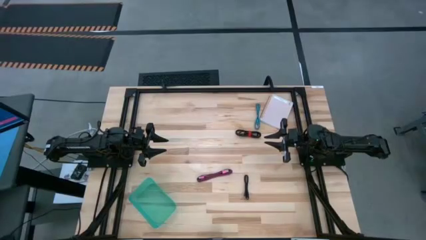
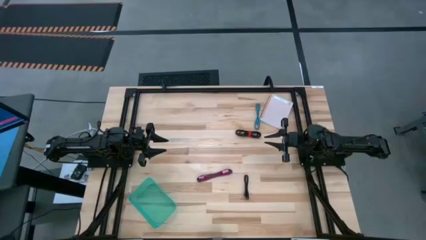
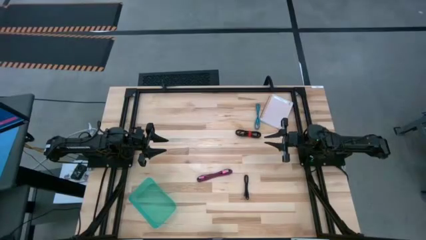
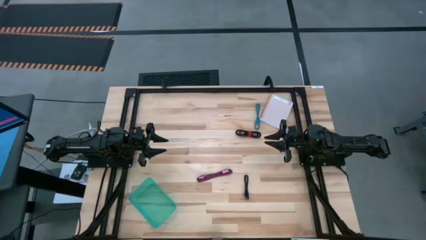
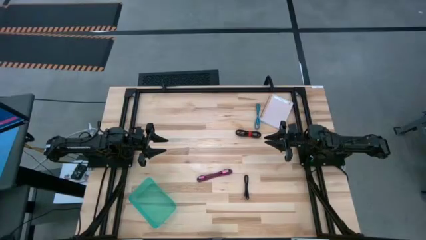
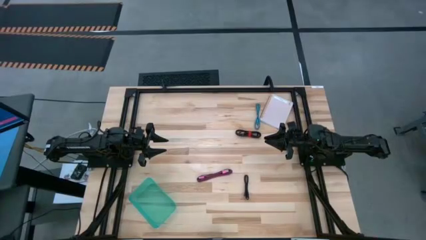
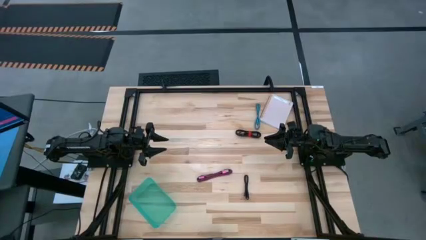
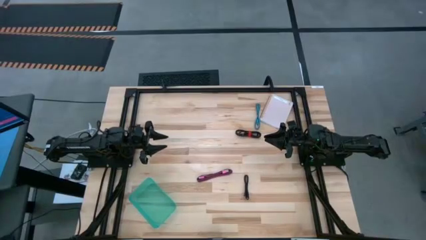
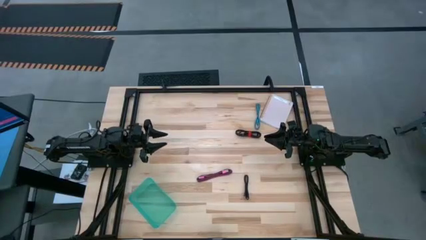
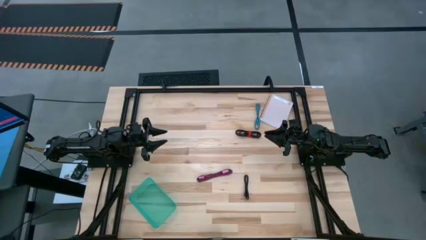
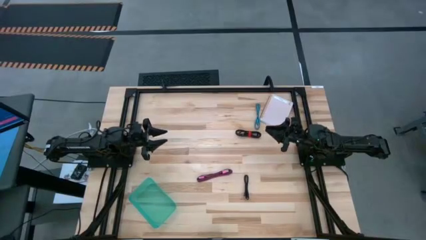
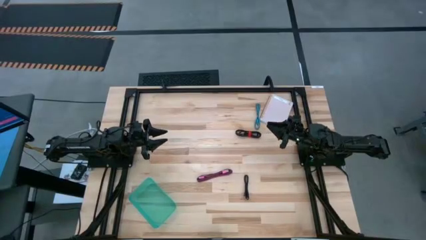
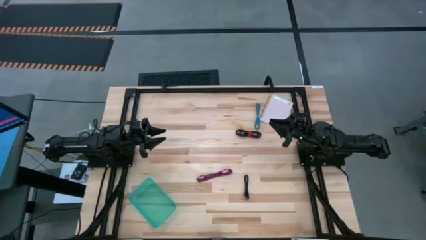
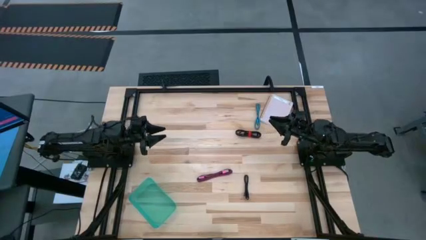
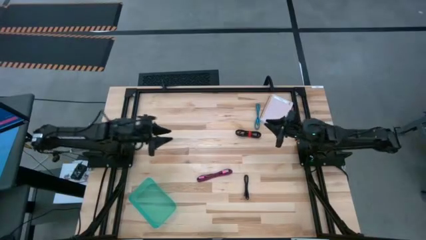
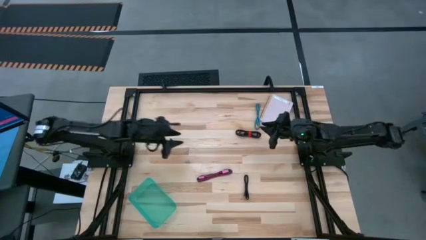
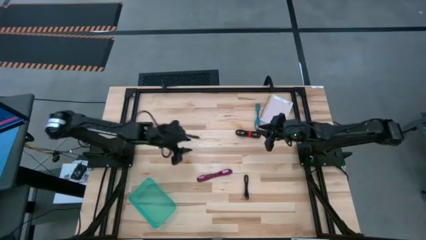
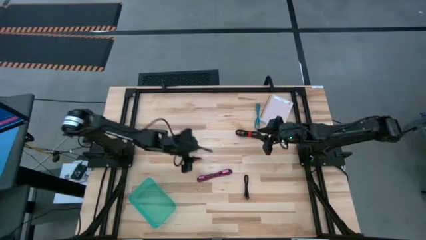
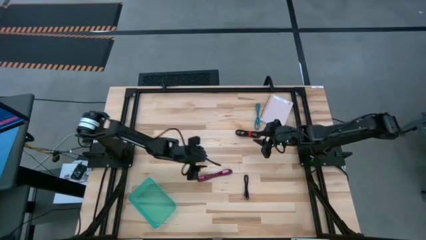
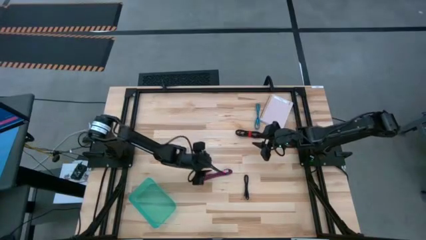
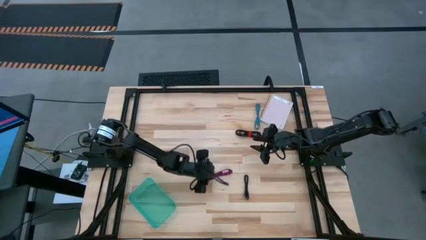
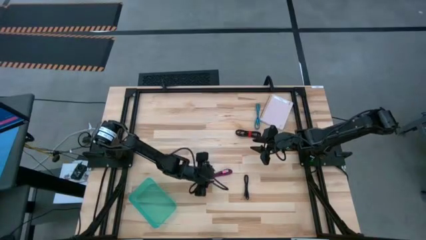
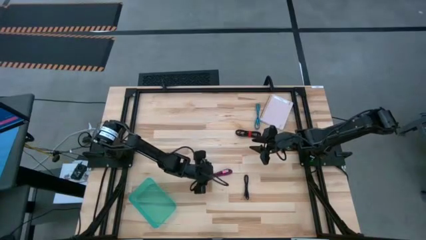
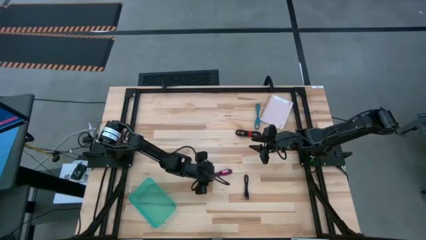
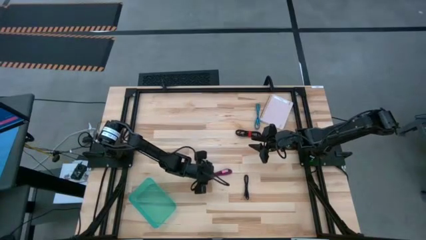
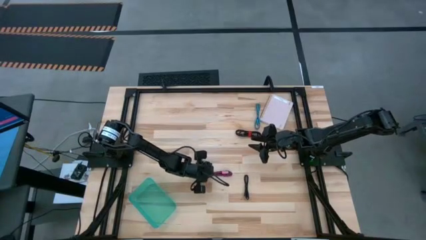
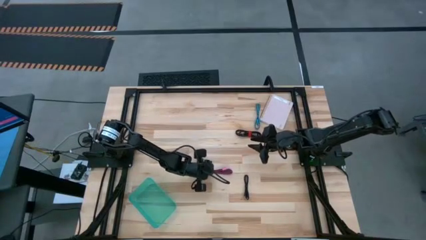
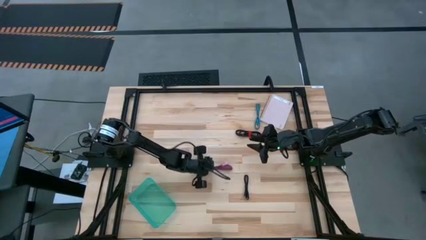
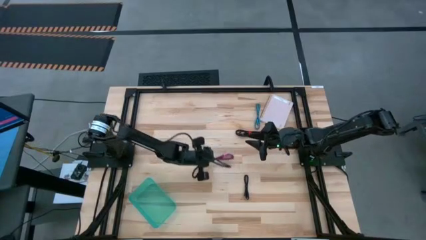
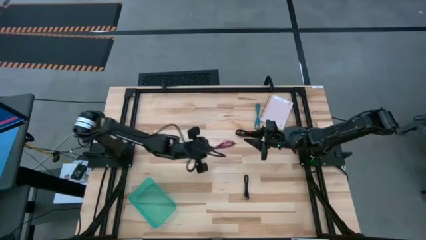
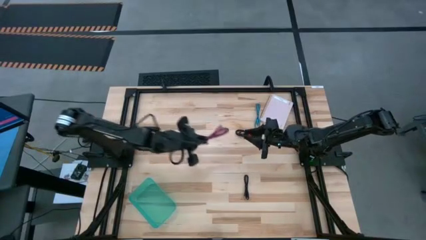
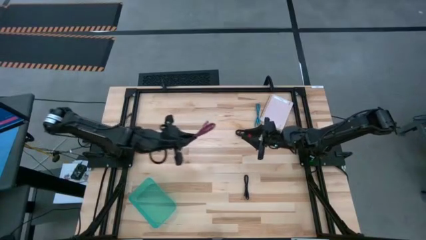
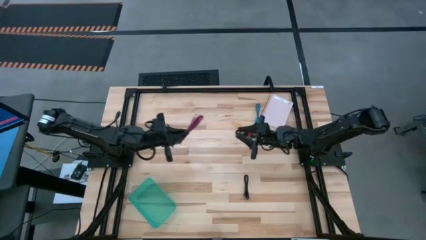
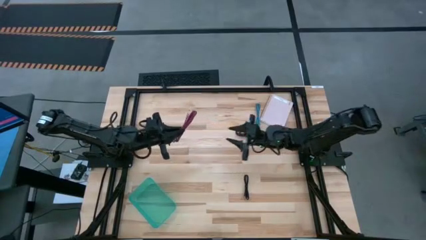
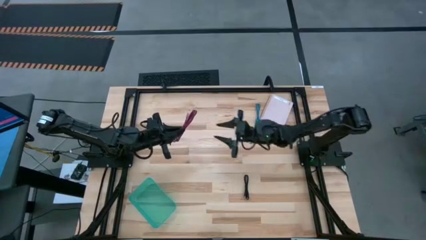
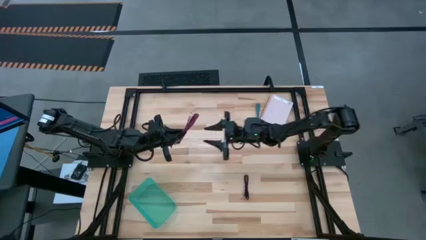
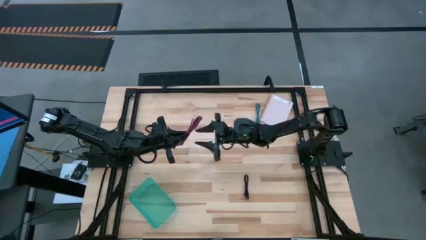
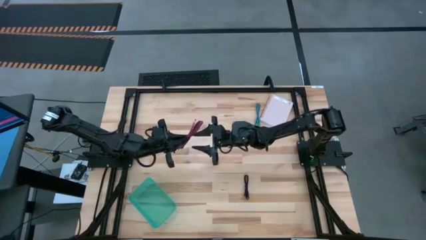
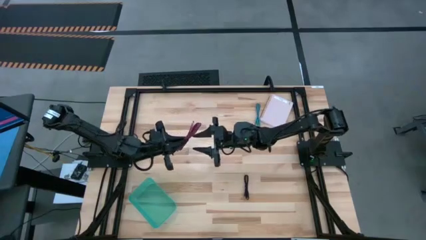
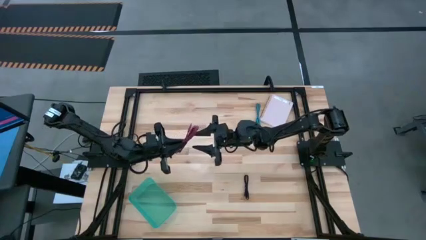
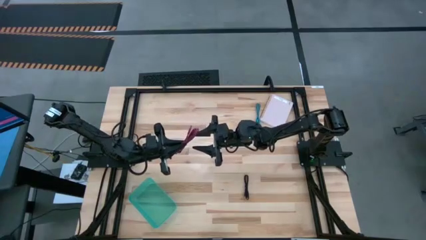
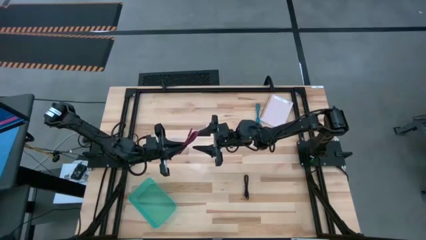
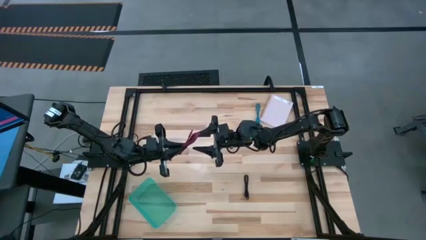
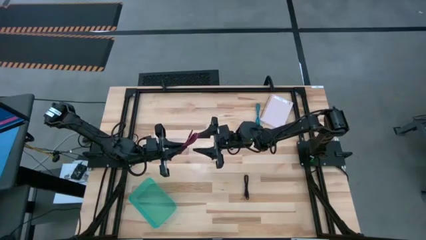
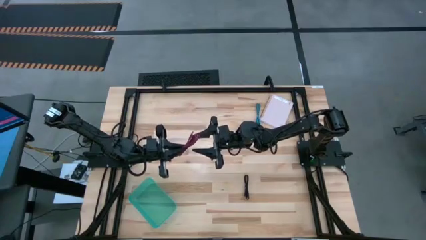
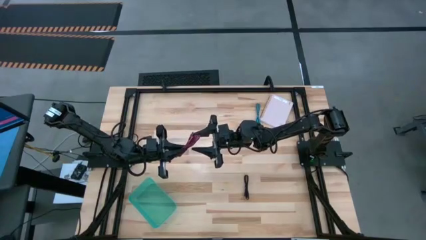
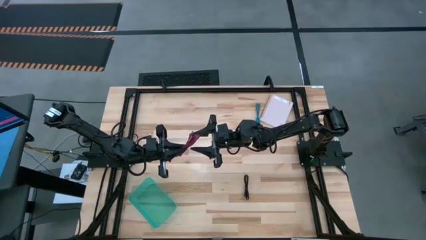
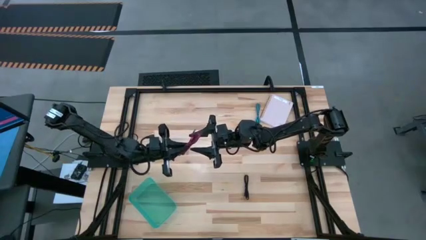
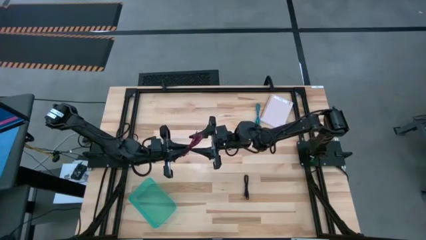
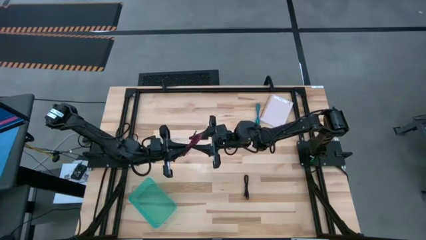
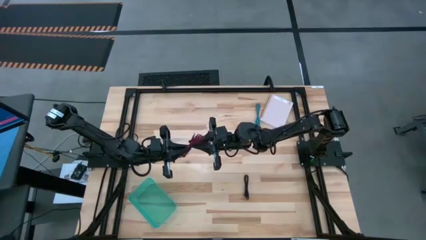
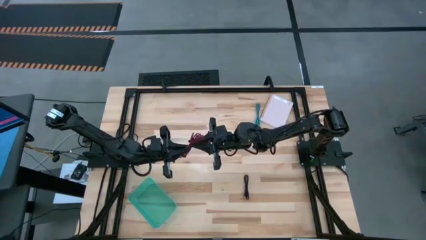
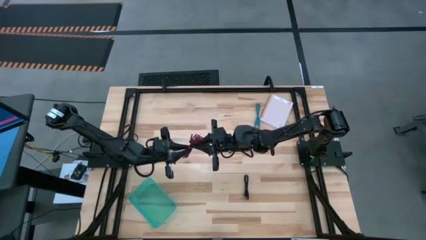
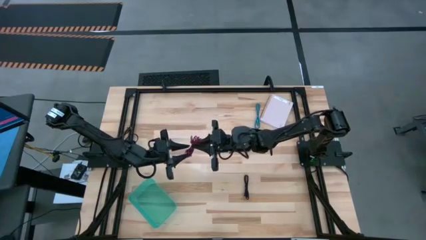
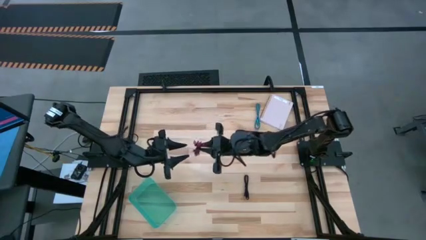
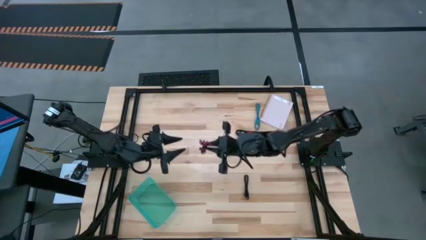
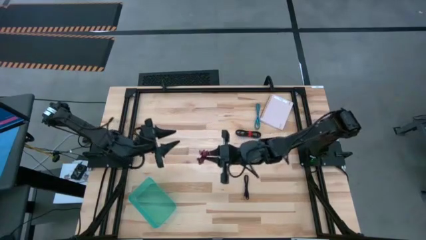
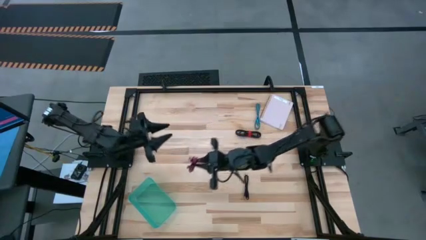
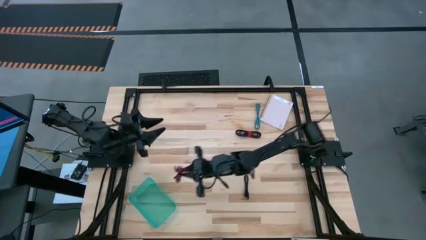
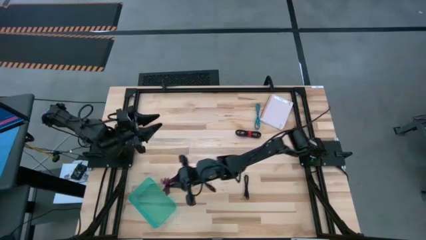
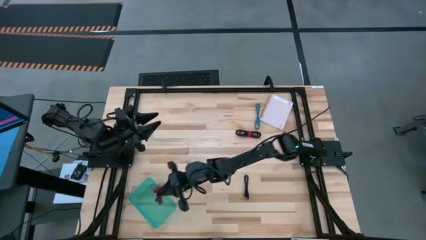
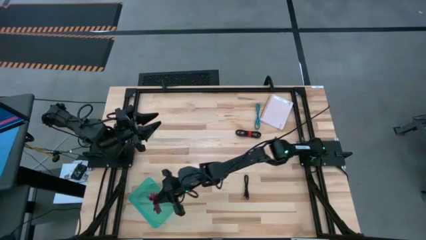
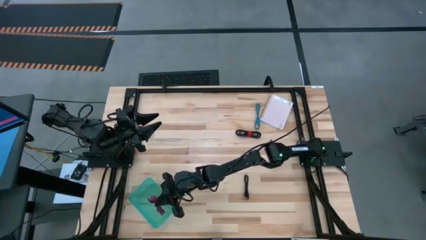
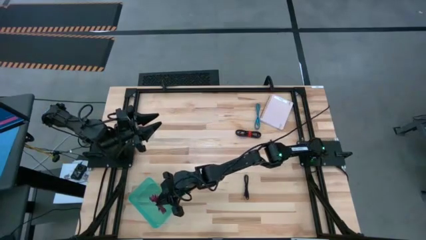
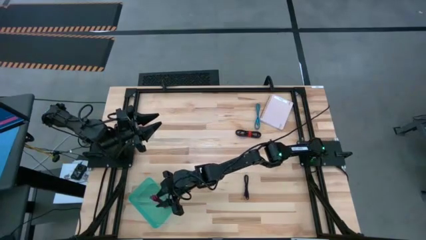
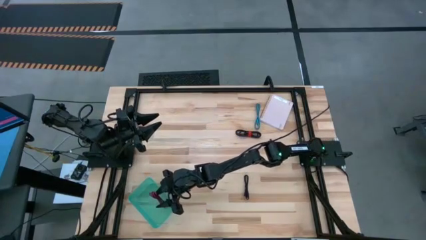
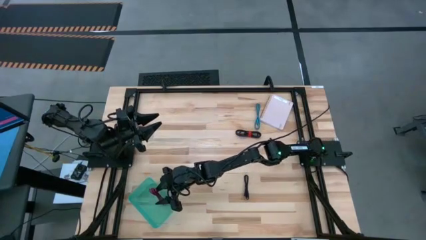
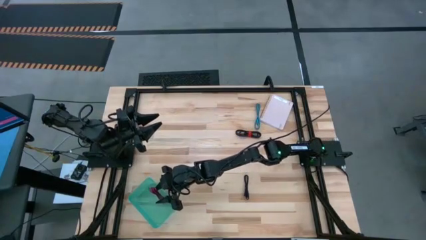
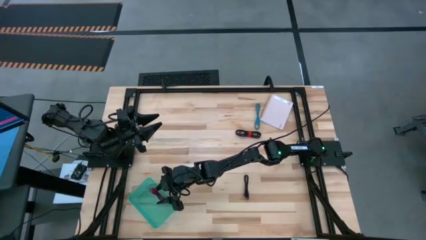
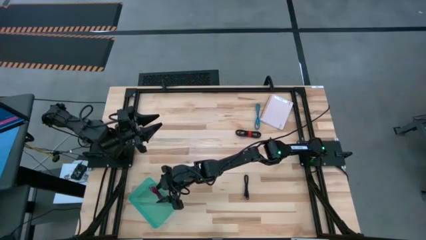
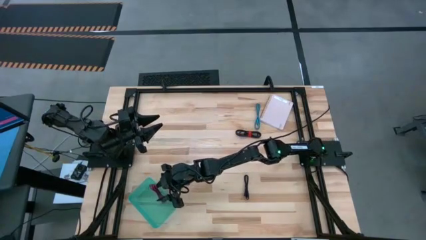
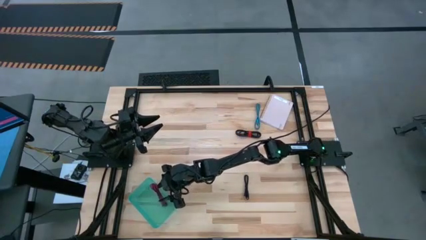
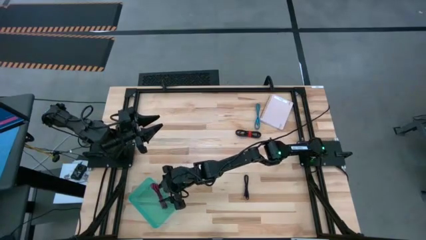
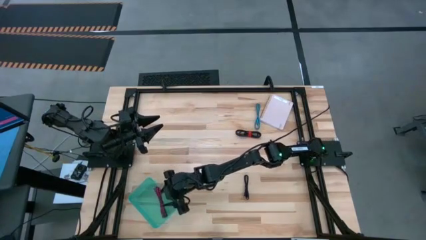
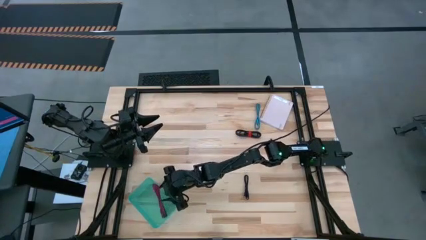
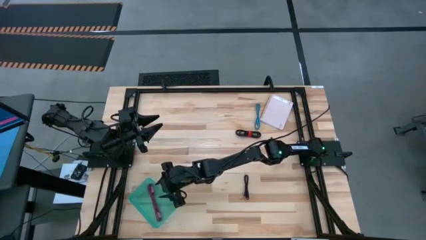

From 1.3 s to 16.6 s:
Task: Pick and place USB-C Cables
Put the pink USB cable into the green bin
